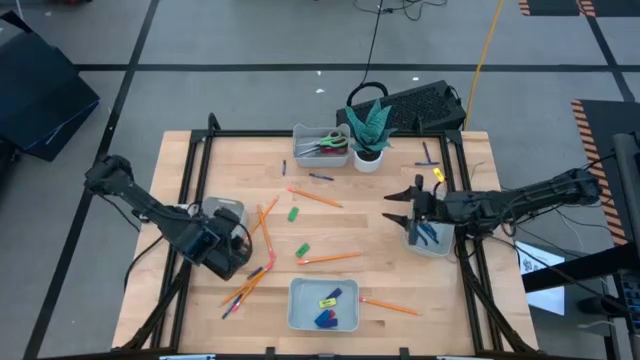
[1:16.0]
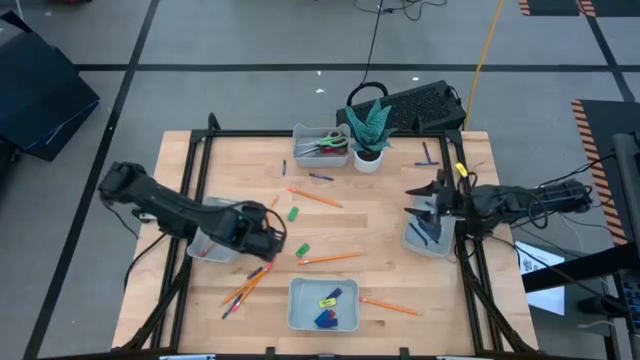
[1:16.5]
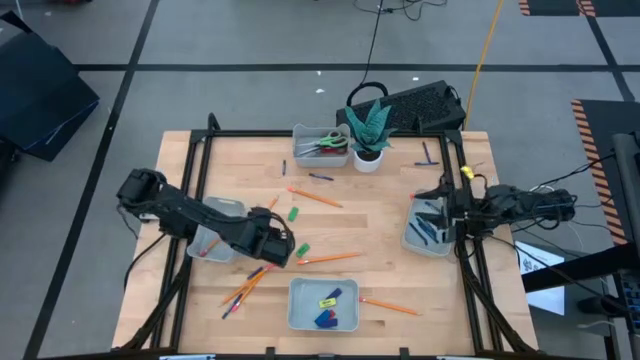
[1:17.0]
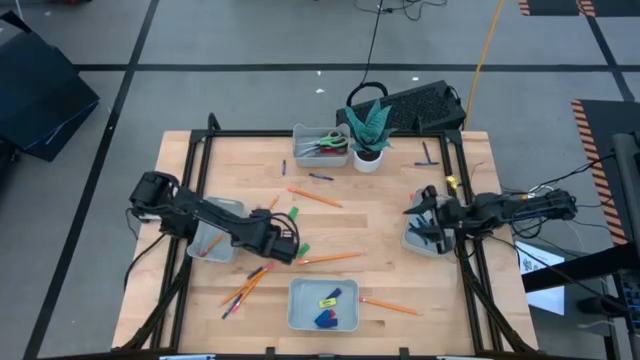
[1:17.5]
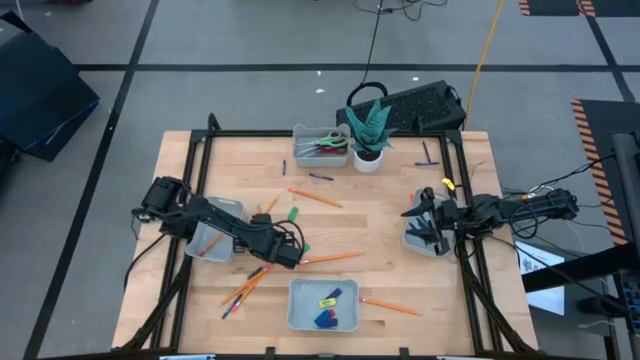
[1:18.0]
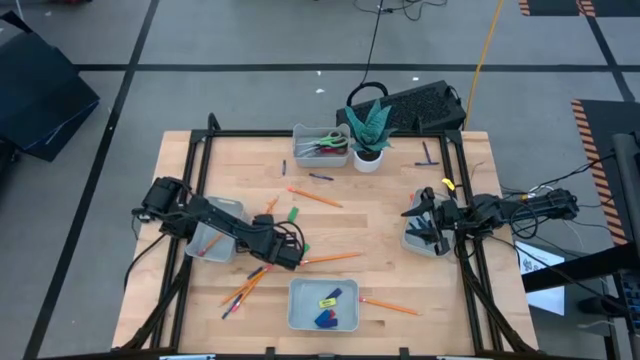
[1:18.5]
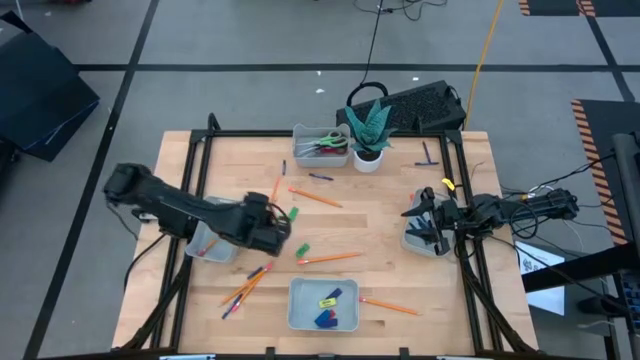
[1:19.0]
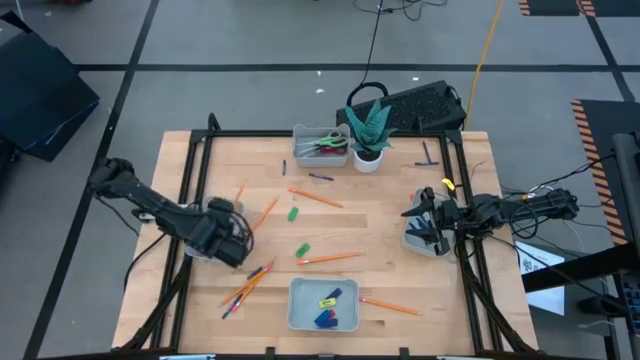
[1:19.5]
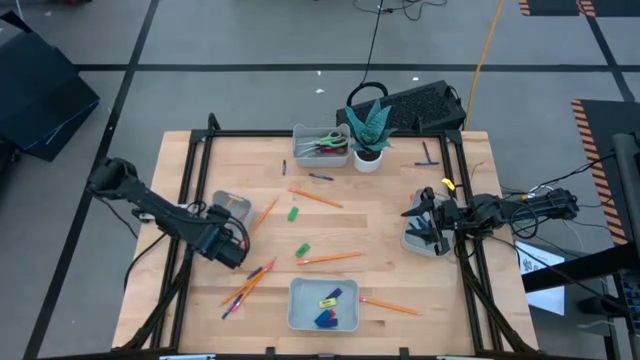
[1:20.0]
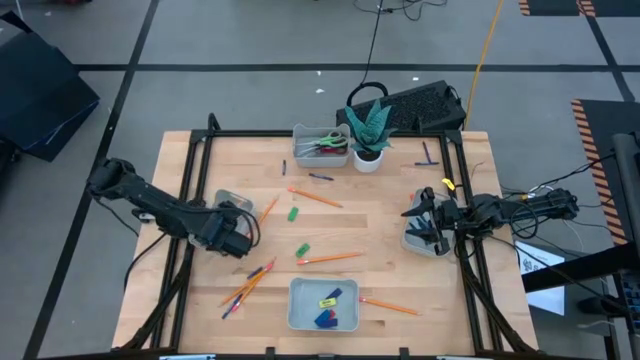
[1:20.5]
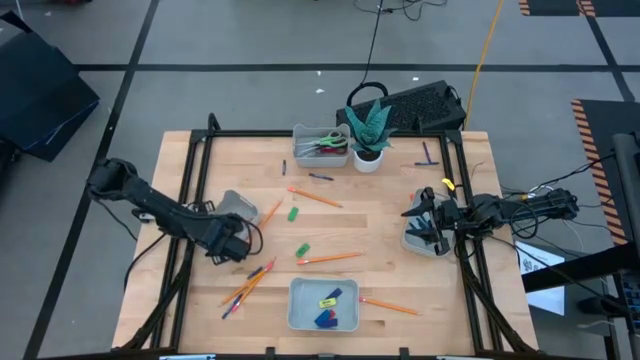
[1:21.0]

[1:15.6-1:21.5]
Task: Sort crayons/erasers/pens/pencils in bins
Put the orange pencil into the middle left gray bin

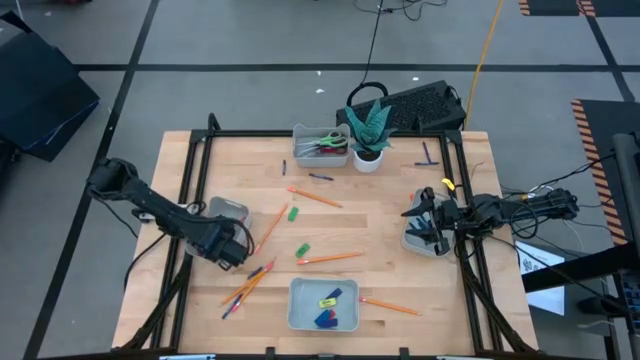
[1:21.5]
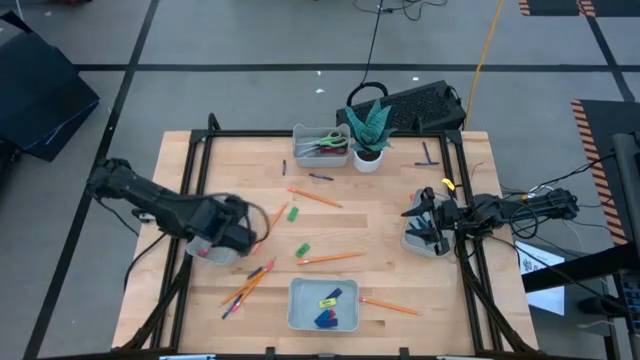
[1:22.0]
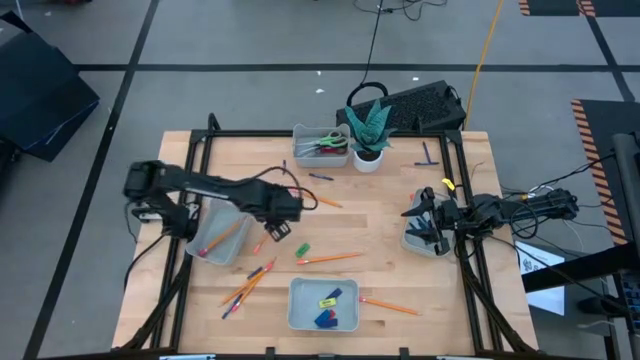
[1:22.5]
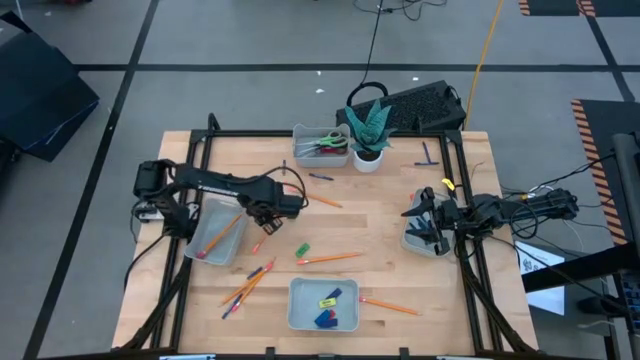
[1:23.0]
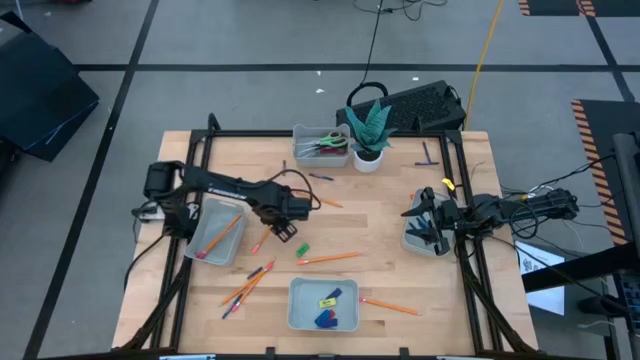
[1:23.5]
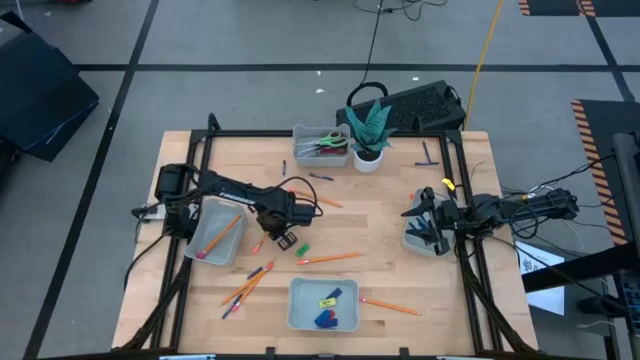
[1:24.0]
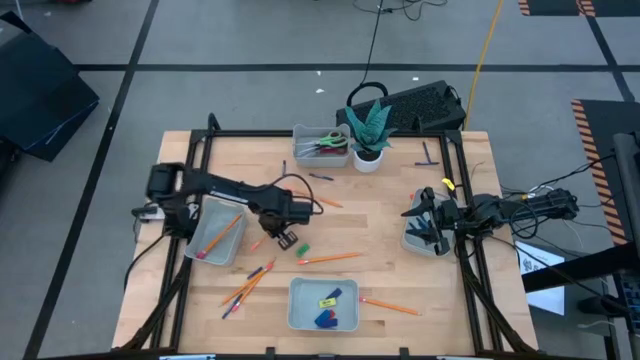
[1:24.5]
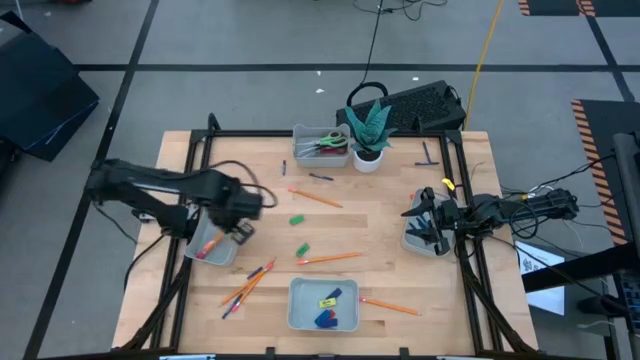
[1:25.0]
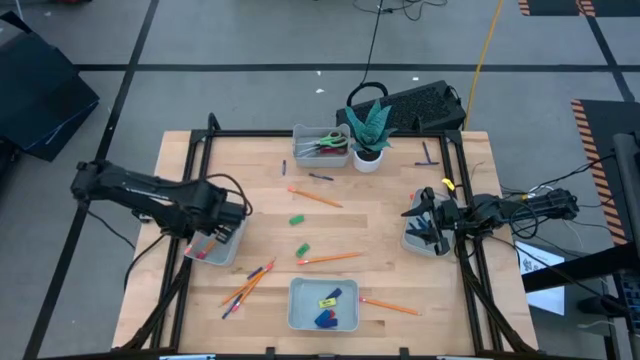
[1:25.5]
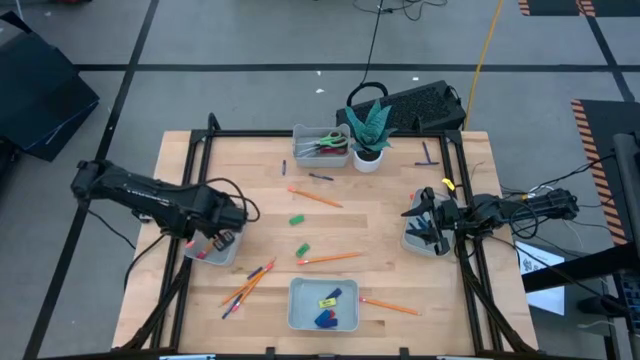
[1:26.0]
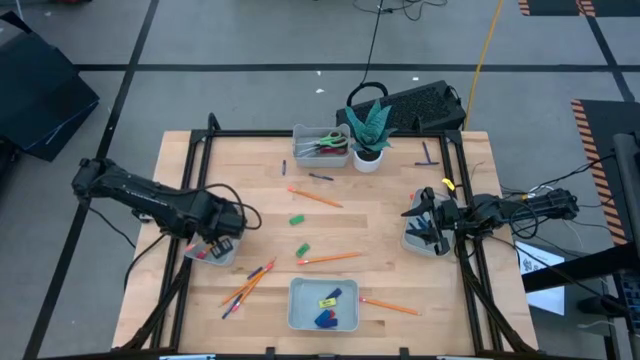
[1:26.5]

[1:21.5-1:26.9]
Put the orange pencil into the middle left gray bin

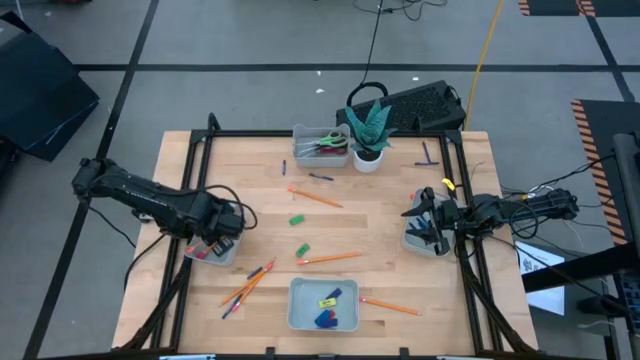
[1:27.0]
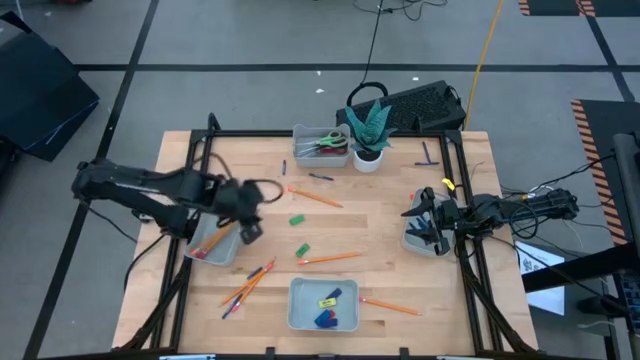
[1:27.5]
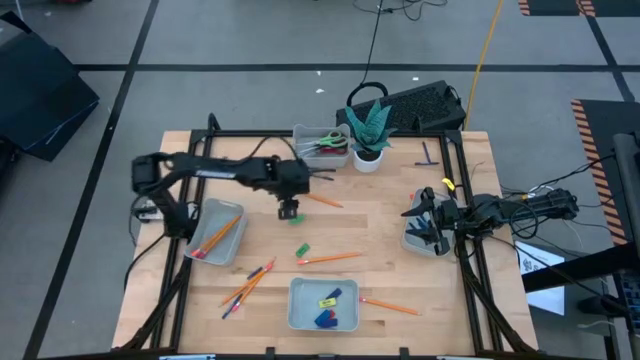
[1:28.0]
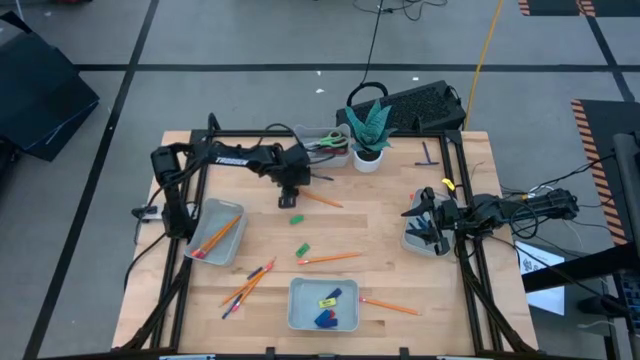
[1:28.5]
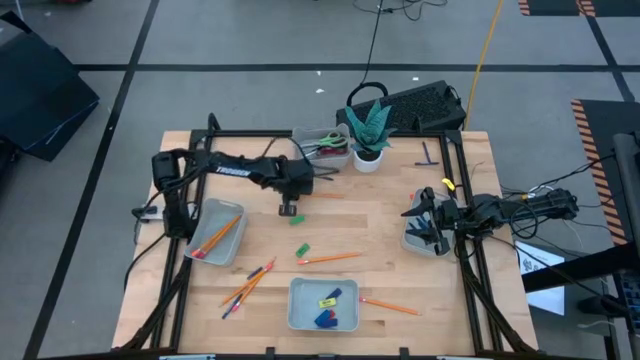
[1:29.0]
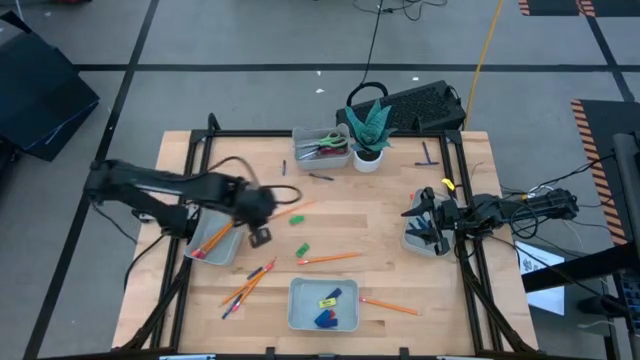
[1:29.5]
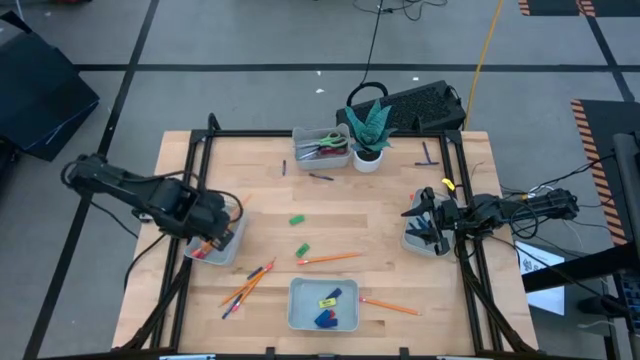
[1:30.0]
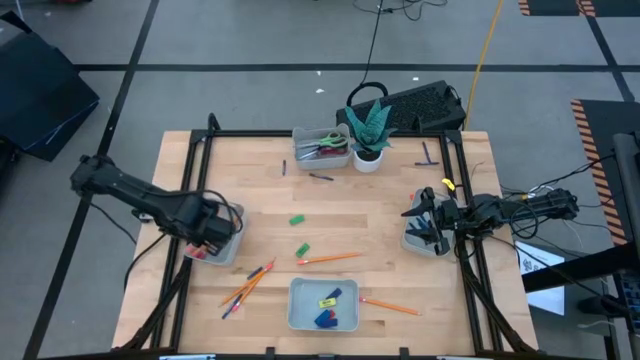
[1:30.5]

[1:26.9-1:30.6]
Put the orange pencil into the middle left gray bin

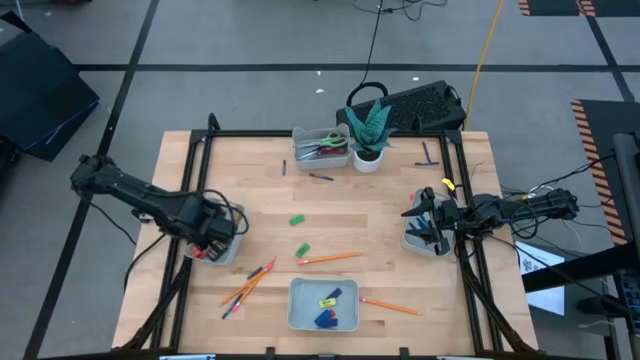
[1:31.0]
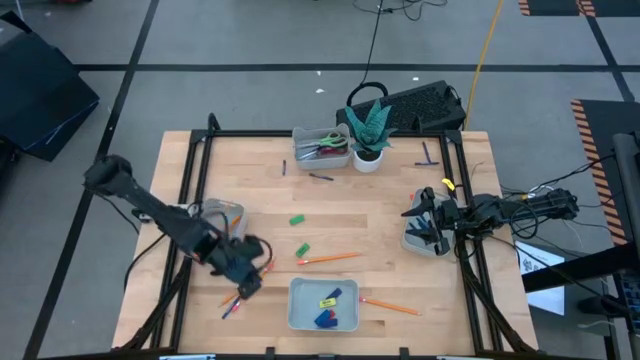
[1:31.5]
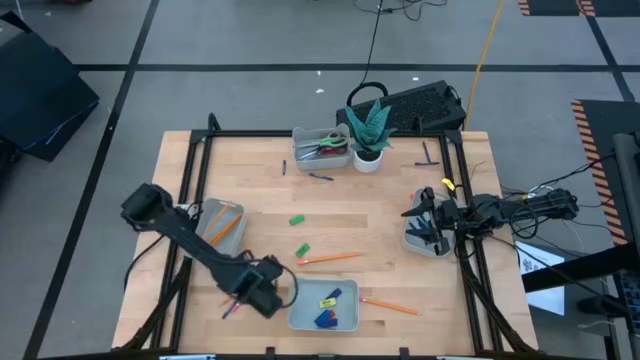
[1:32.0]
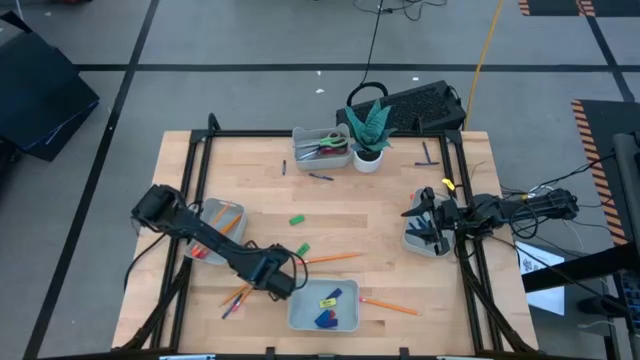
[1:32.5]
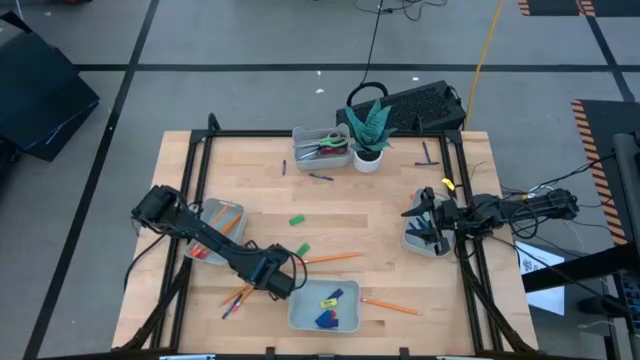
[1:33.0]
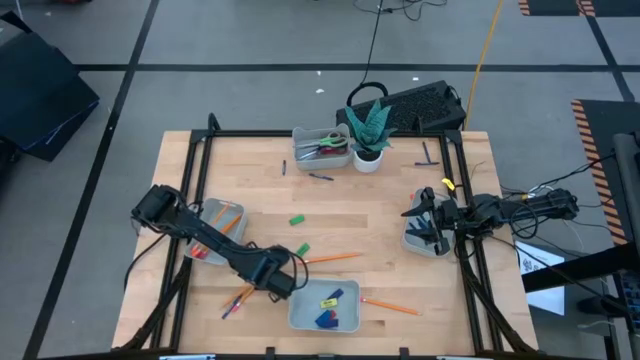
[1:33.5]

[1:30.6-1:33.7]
Put the orange pencil into the middle left gray bin

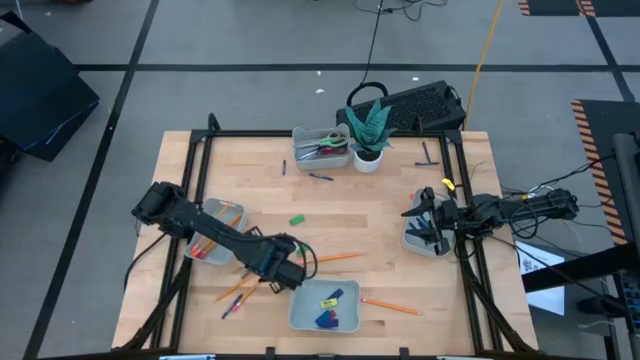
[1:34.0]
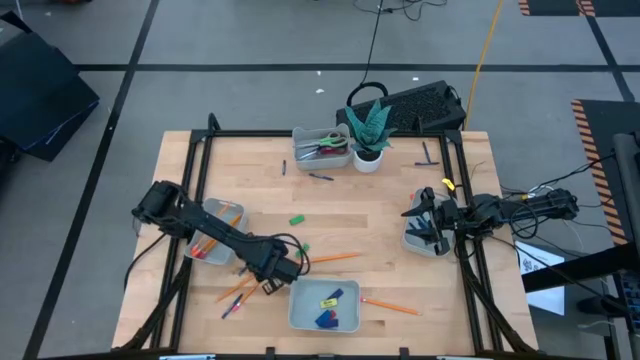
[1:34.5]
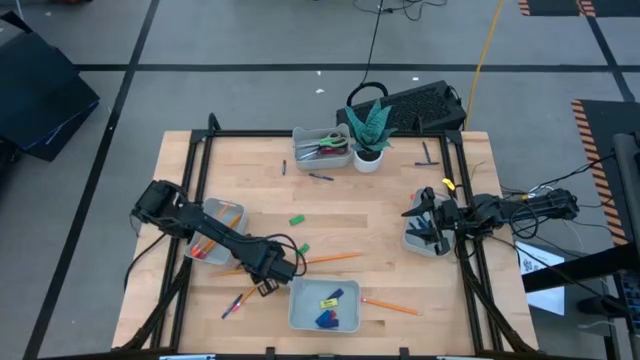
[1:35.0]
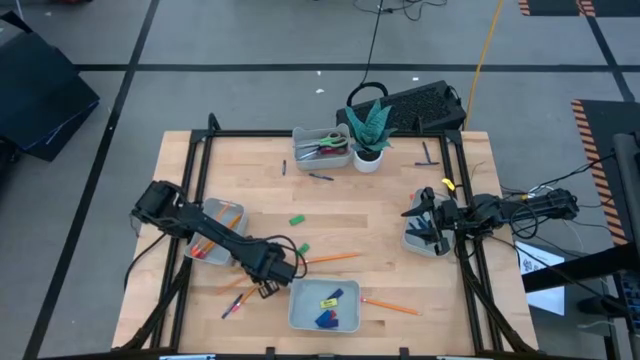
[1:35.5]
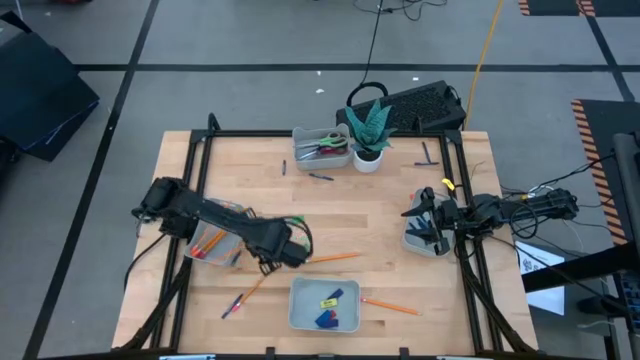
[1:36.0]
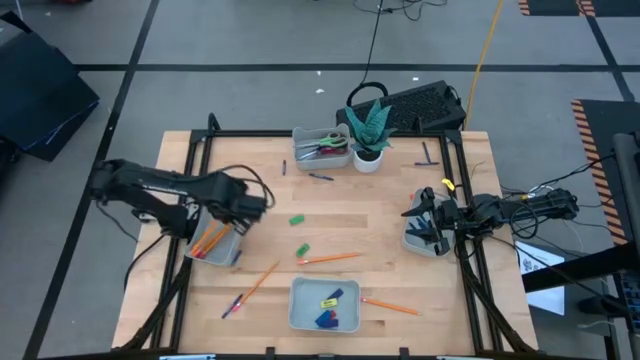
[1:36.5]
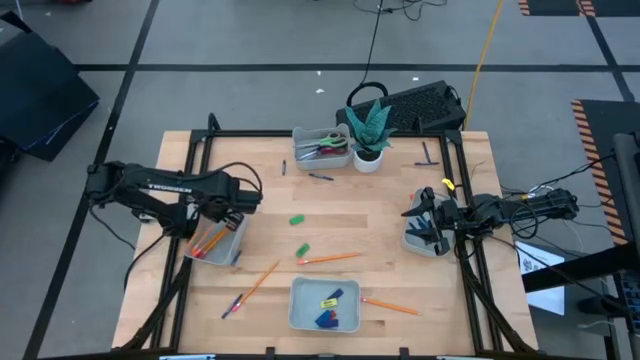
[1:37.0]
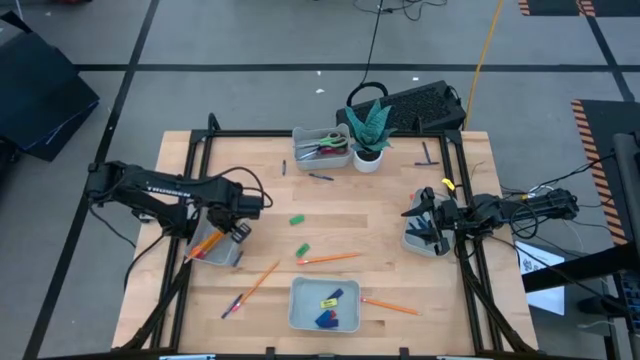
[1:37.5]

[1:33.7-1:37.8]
Put the orange pencil into the middle left gray bin
